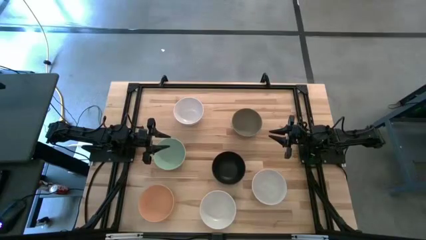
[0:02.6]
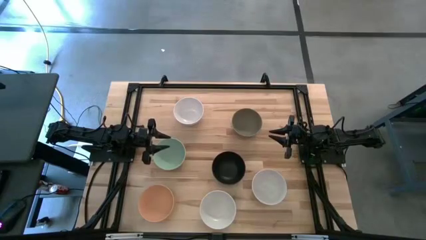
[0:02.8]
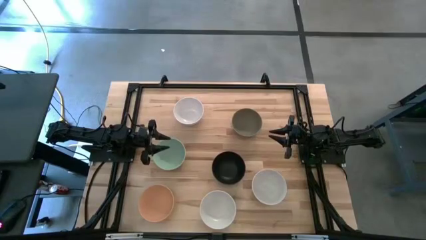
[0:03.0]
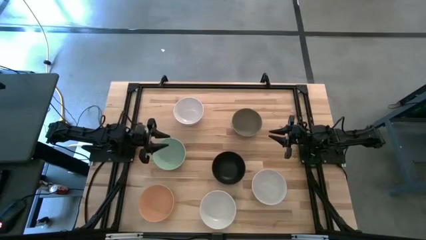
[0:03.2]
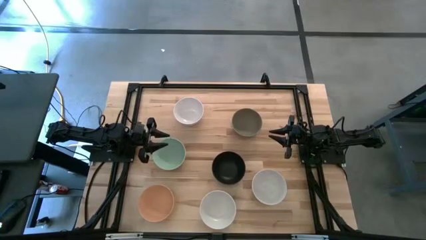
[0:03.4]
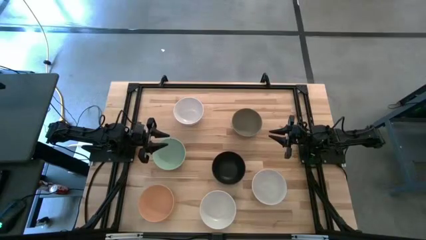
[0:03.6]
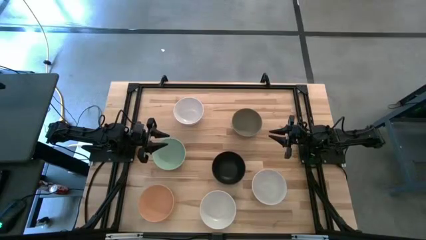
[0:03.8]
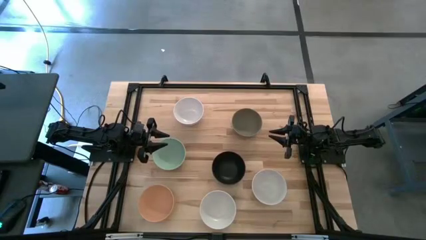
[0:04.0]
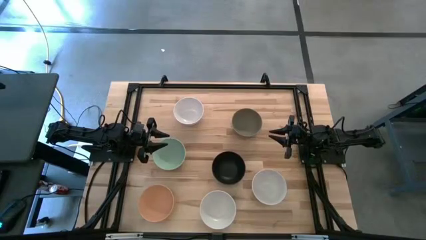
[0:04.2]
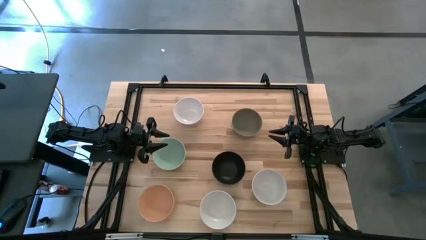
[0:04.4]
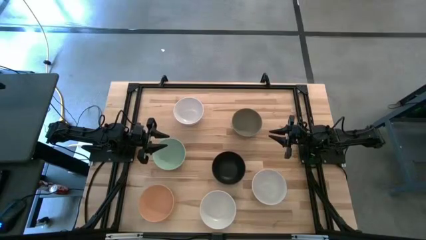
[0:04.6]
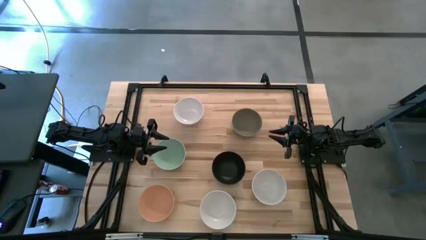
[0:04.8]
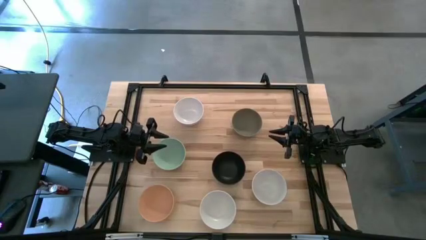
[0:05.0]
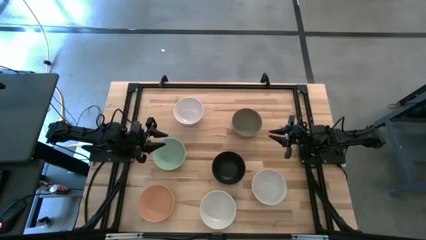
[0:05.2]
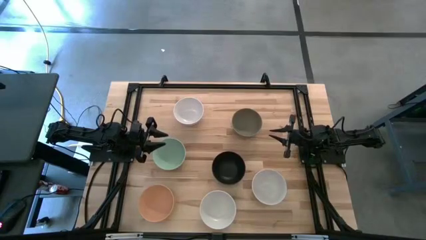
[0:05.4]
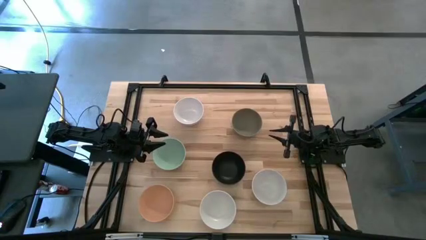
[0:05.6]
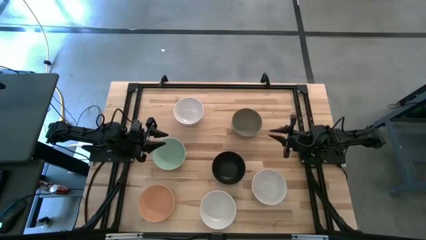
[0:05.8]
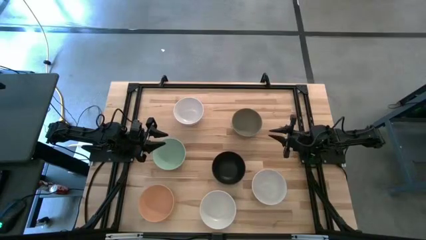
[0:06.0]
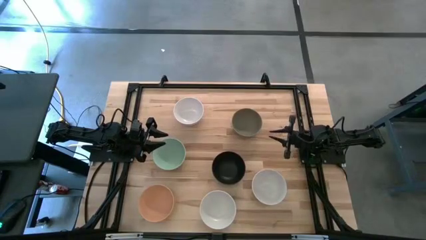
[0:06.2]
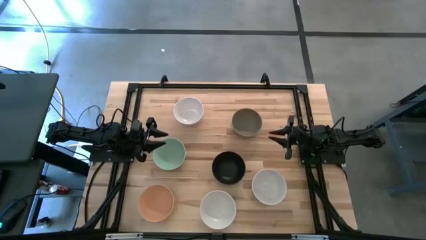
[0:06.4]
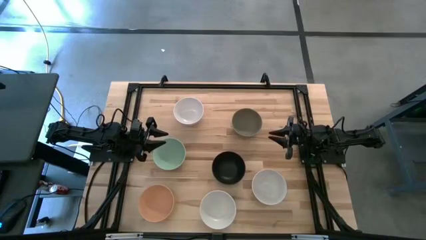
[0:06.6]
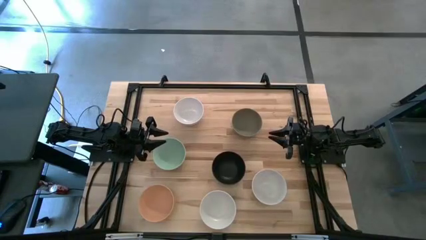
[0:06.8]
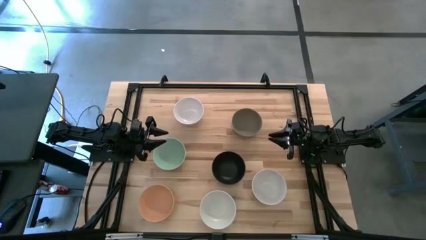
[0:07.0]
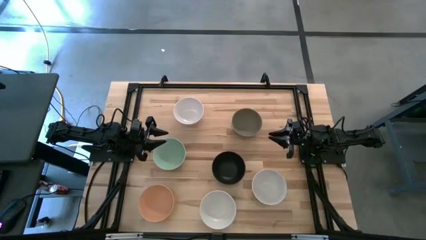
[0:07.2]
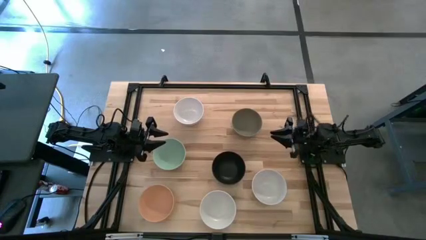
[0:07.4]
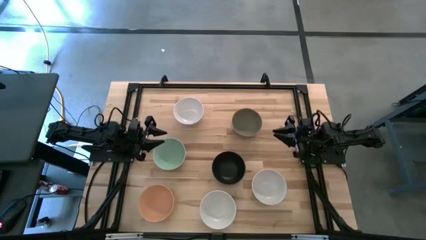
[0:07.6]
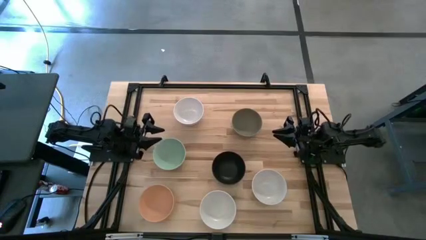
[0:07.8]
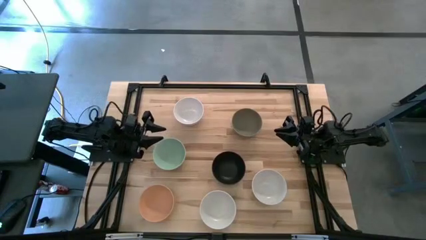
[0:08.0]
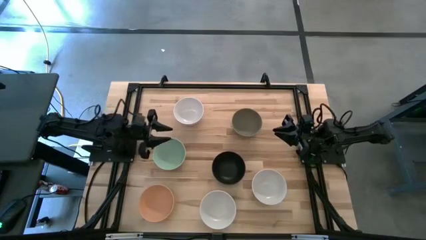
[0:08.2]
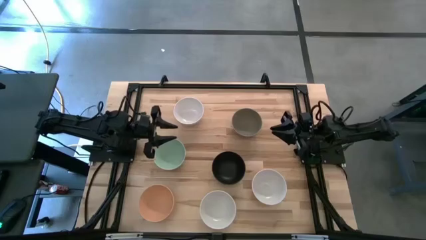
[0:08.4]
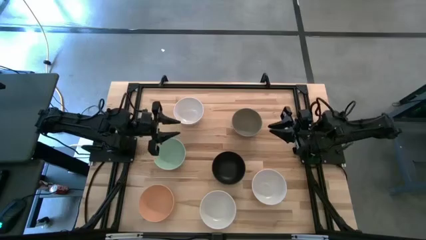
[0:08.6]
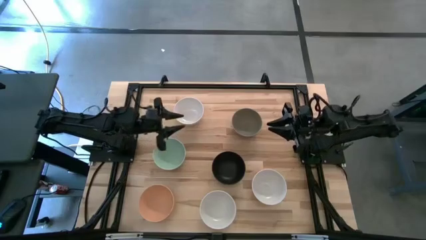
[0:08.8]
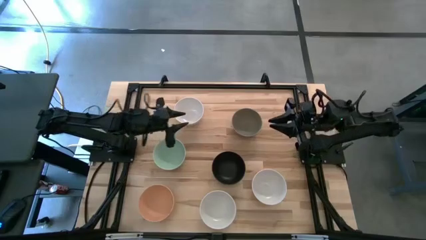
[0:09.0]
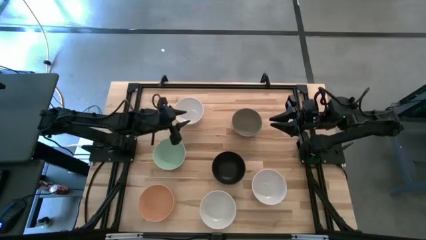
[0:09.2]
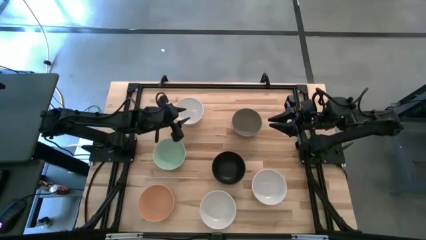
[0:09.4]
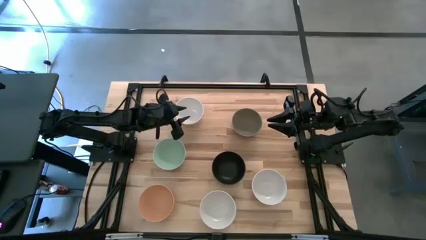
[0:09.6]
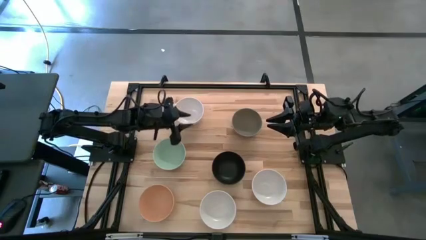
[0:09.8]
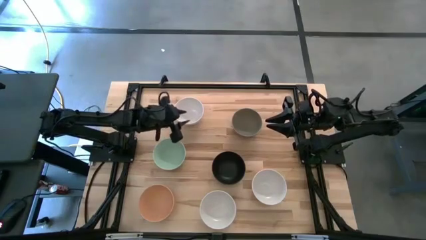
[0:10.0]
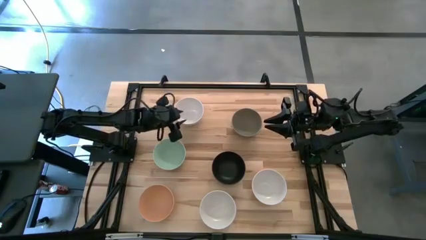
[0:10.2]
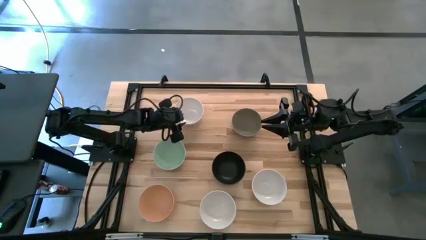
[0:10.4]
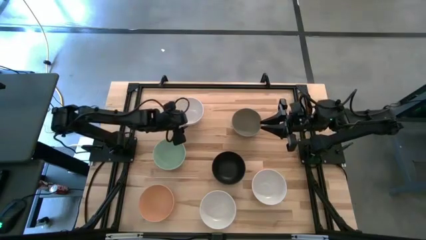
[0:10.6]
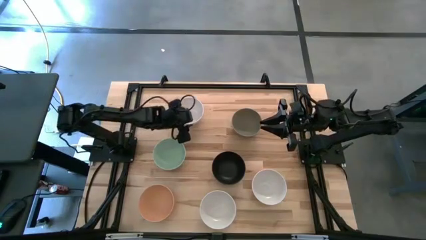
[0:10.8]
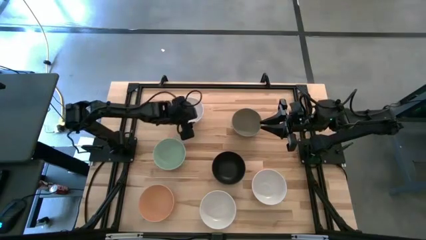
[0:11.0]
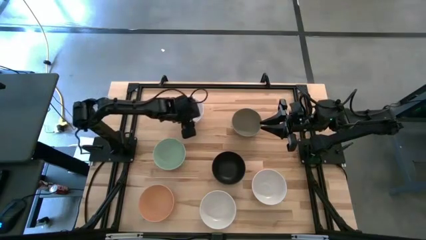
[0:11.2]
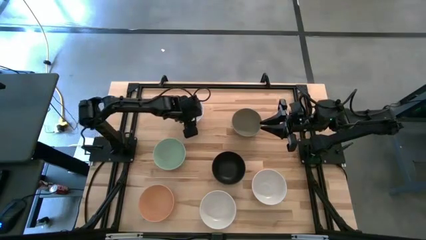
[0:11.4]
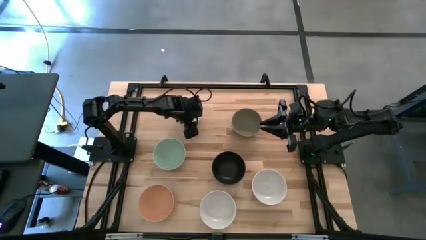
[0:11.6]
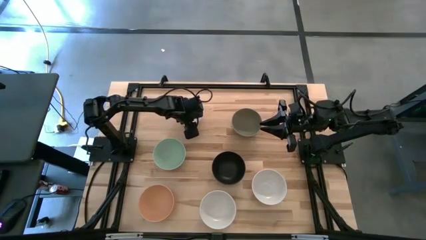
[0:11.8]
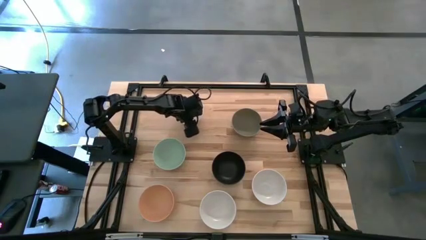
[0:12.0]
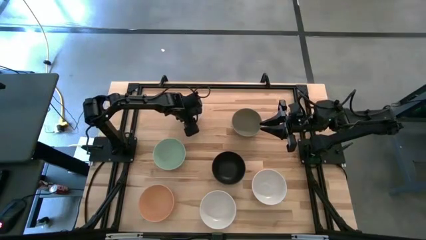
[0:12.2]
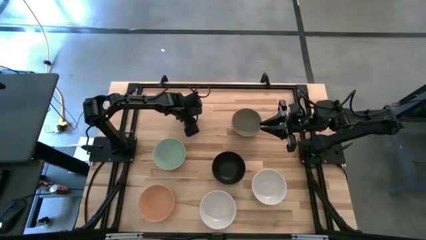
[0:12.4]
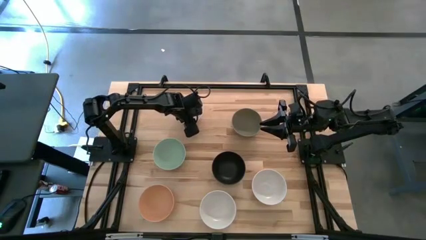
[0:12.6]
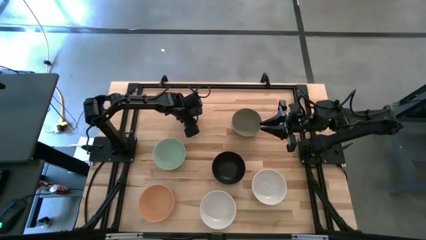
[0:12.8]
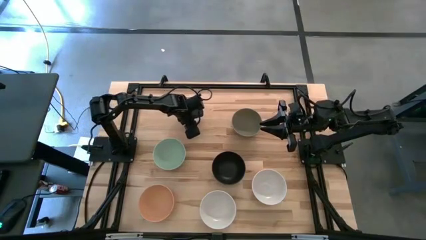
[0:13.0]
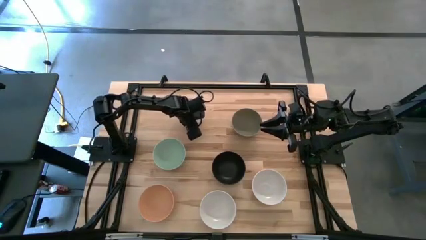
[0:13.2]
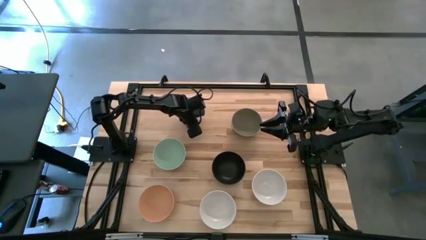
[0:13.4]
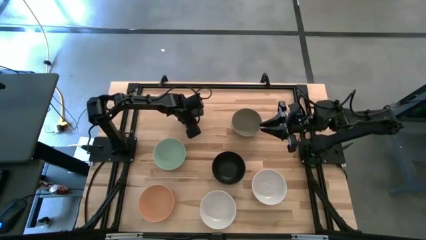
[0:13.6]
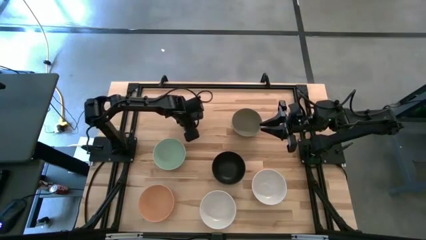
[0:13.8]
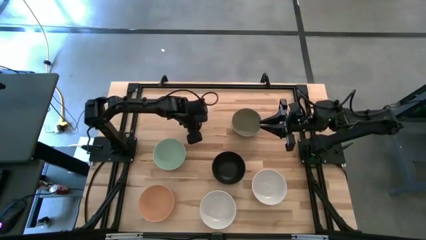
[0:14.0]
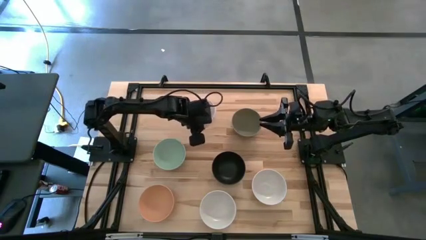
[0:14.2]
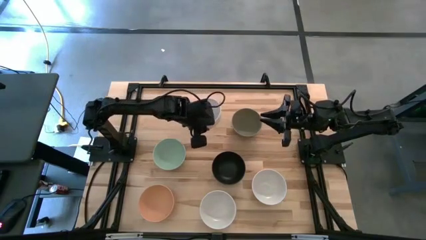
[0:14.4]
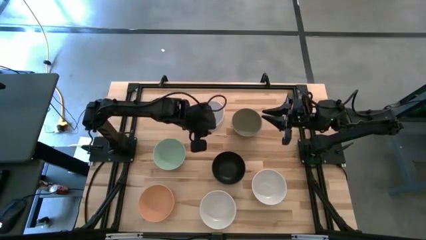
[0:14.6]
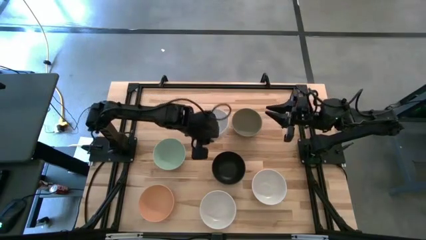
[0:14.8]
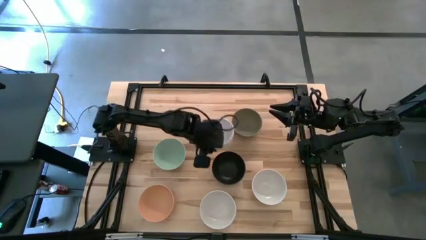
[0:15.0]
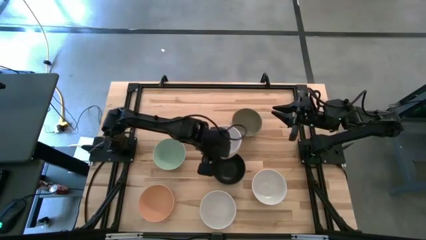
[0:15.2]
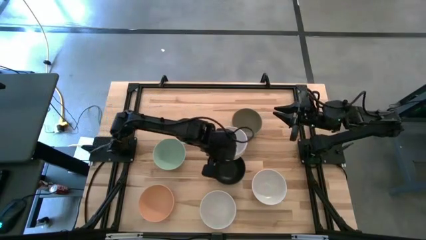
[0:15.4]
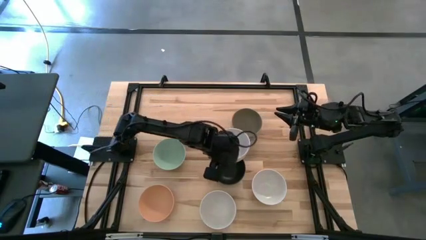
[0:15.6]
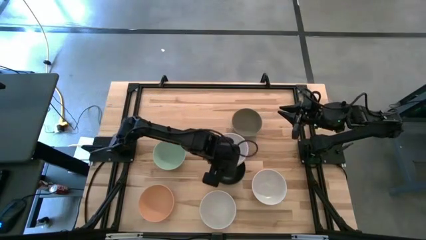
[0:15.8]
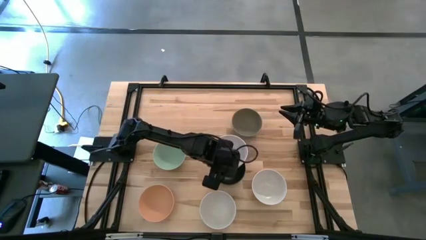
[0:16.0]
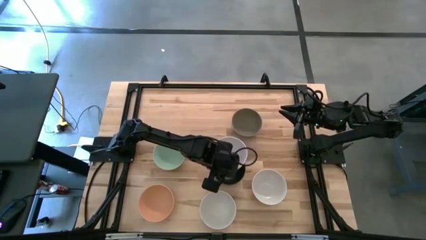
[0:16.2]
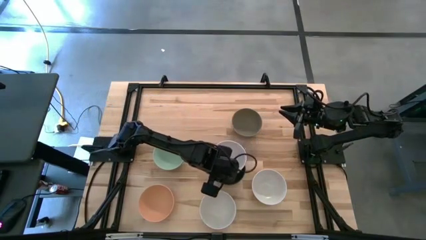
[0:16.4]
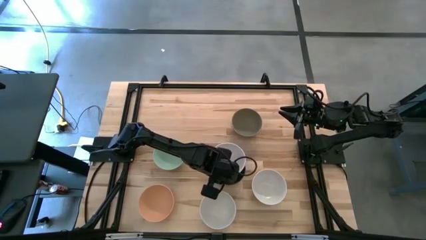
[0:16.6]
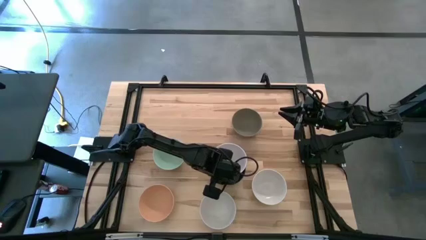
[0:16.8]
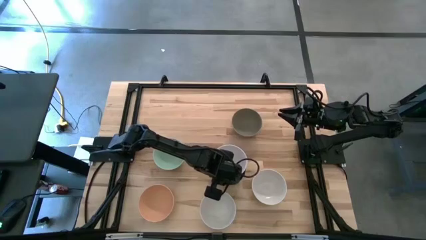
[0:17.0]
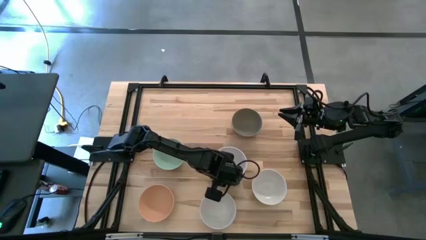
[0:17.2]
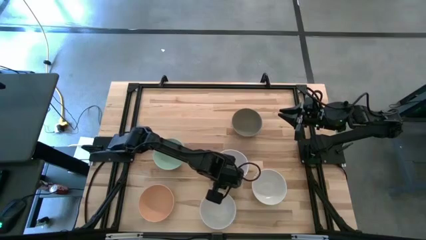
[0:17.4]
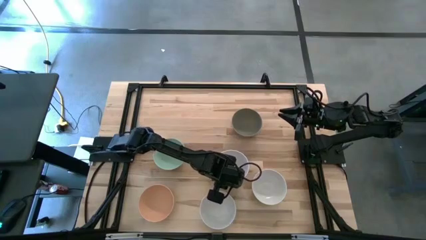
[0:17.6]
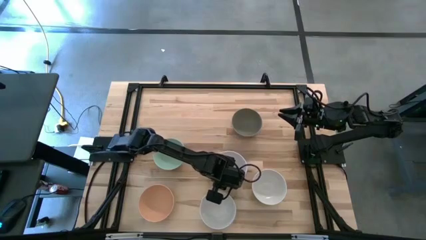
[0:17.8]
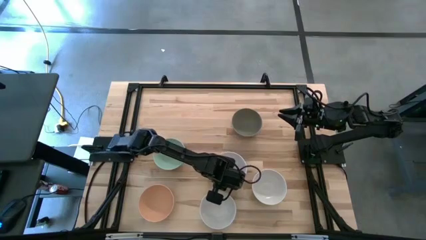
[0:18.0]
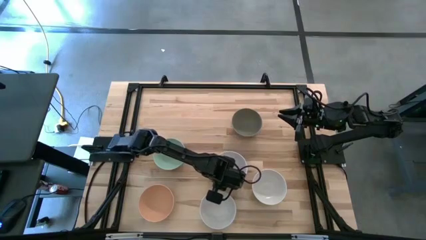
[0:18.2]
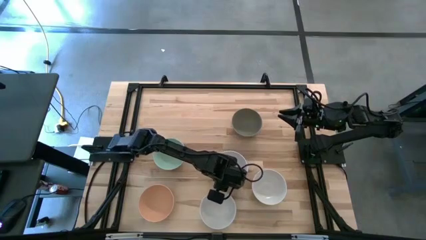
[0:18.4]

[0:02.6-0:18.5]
Task: Nest bowls inside each other
Stack the top white bowl on top of the black bowl
